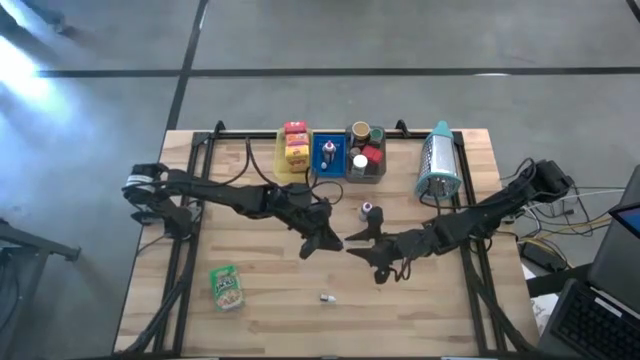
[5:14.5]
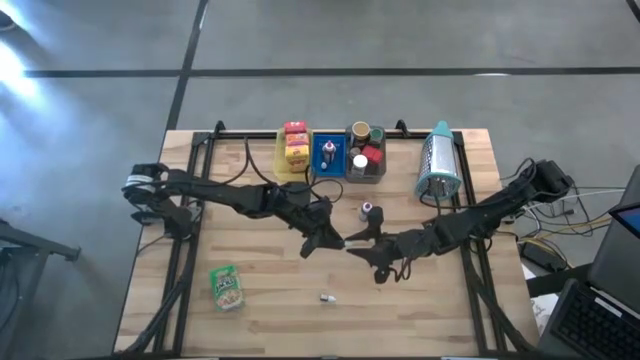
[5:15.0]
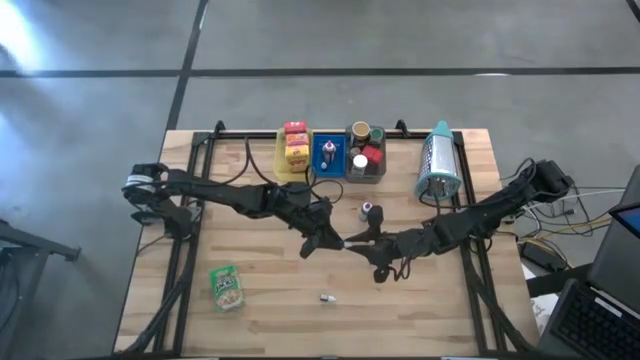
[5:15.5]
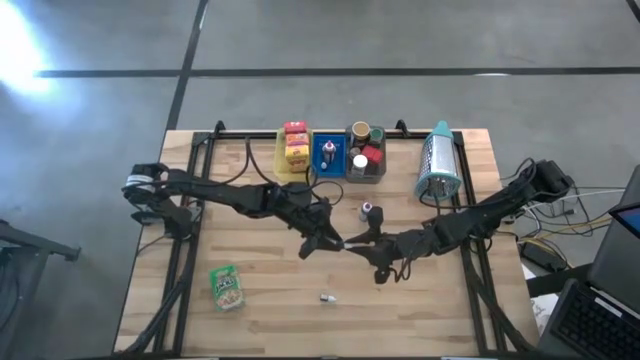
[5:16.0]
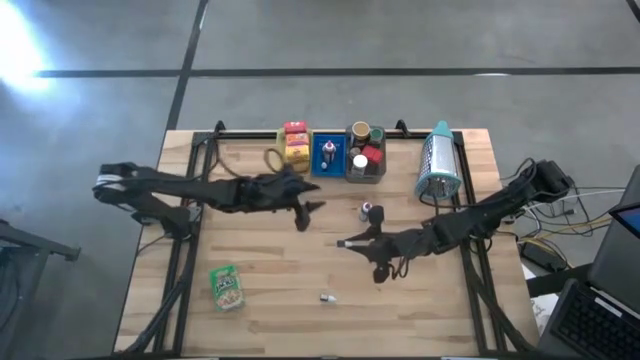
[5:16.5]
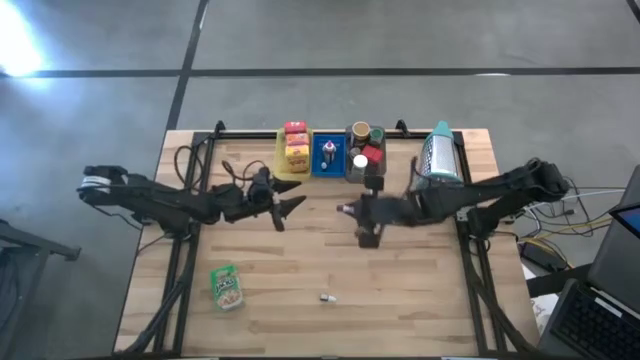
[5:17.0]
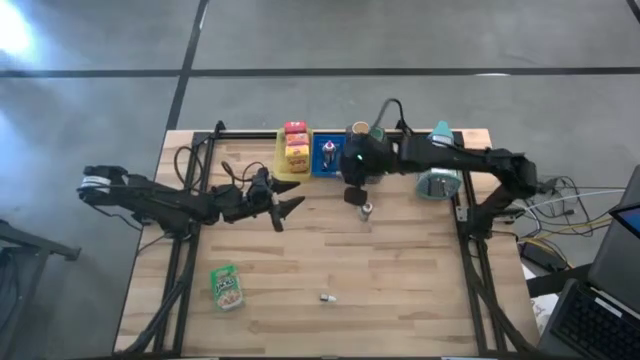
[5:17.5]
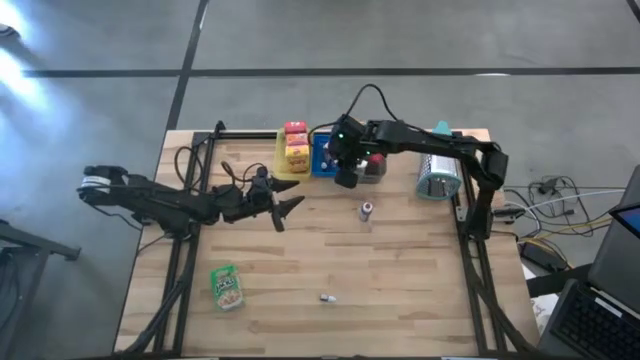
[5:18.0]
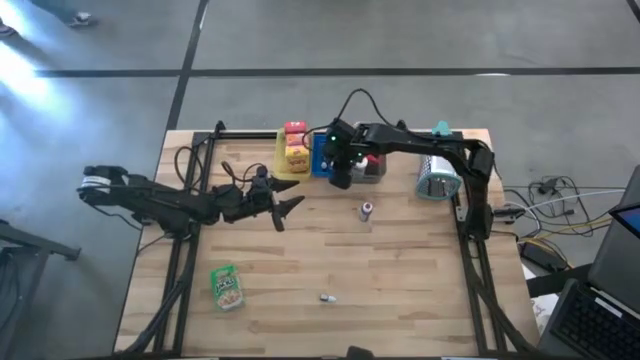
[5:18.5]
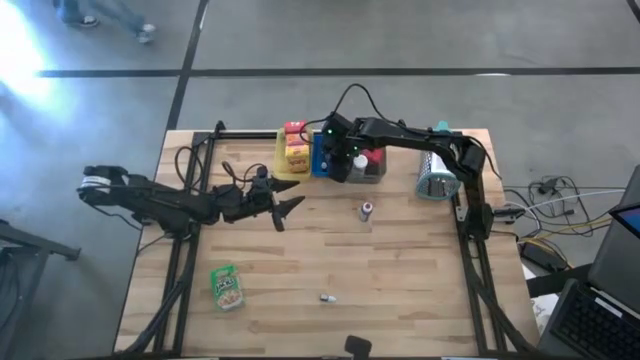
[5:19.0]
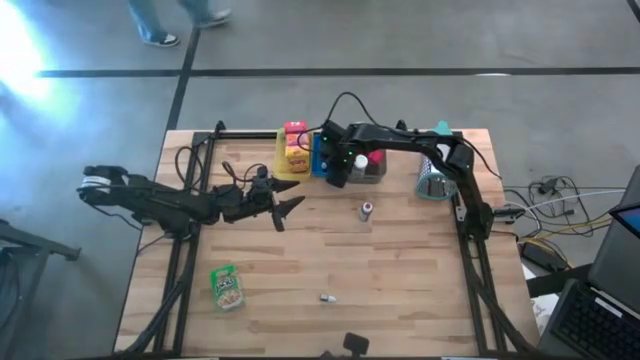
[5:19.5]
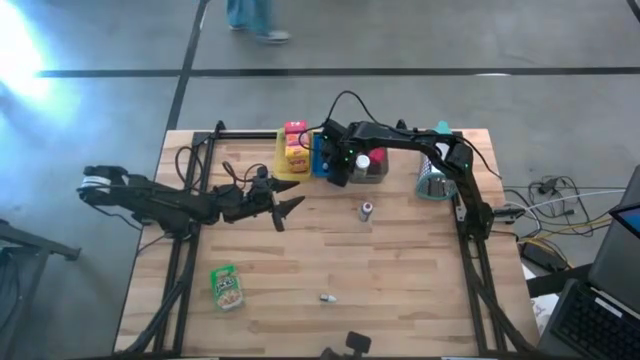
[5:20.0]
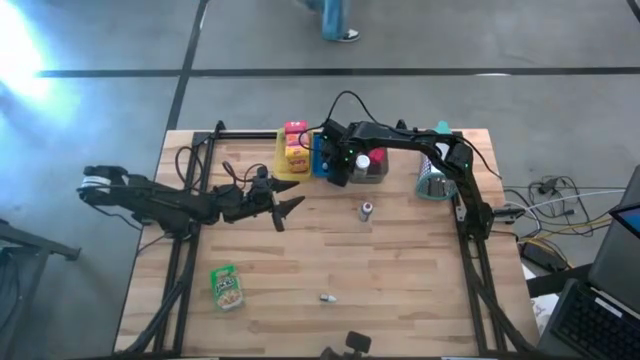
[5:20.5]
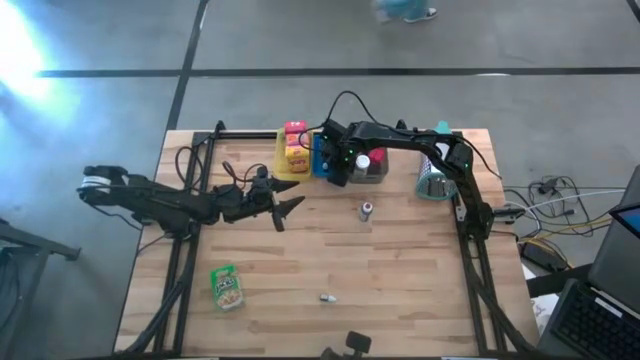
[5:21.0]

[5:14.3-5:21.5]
Task: Pick & Place Kitchen Items
Put the small purple food coloring bottle into the blue bin

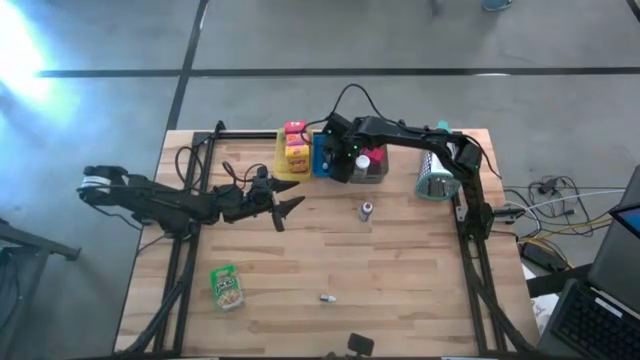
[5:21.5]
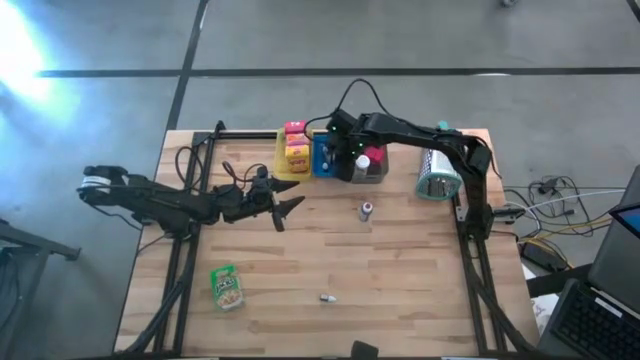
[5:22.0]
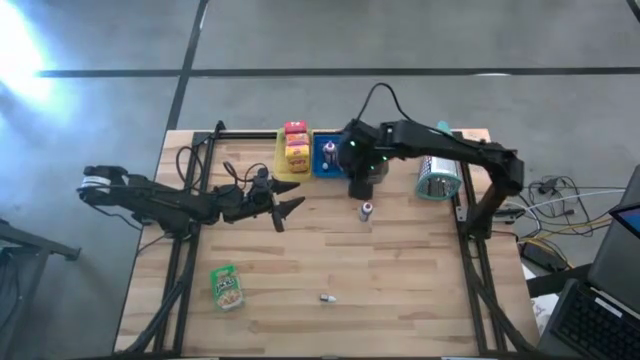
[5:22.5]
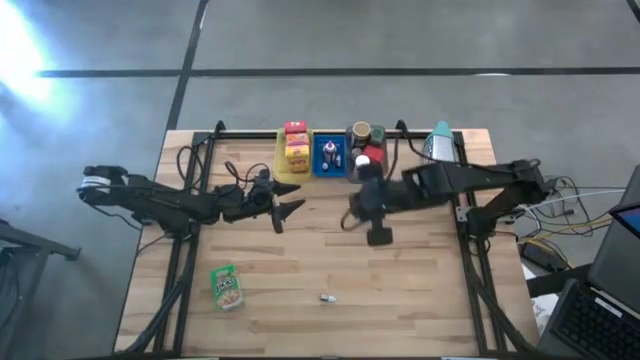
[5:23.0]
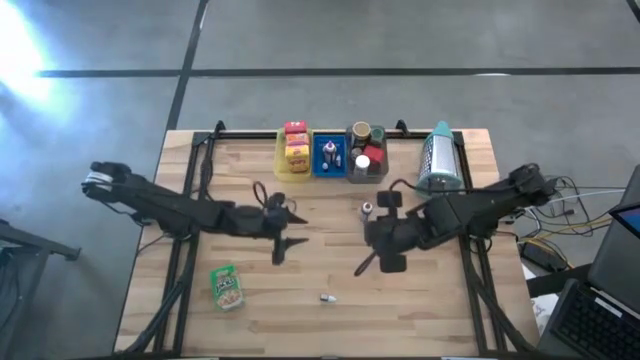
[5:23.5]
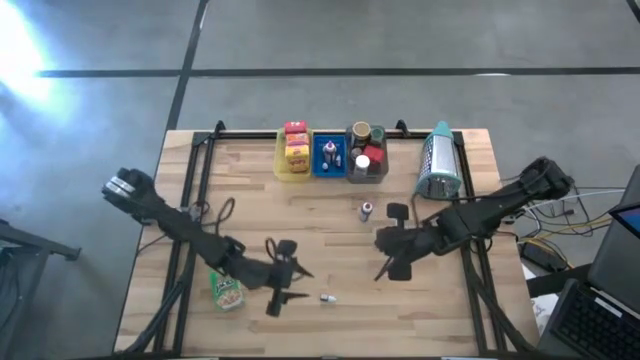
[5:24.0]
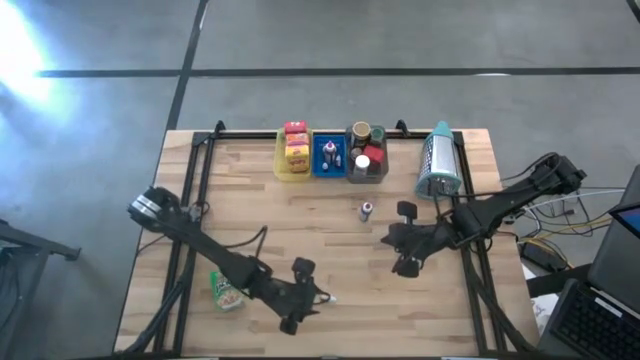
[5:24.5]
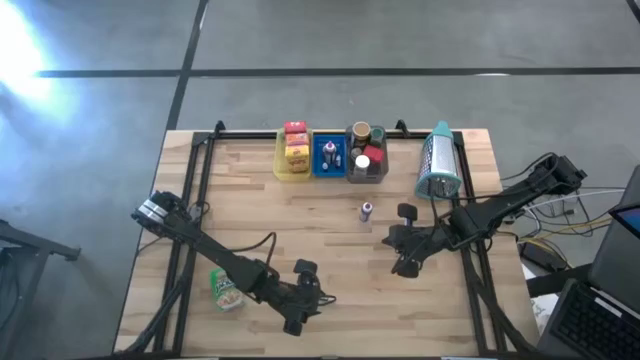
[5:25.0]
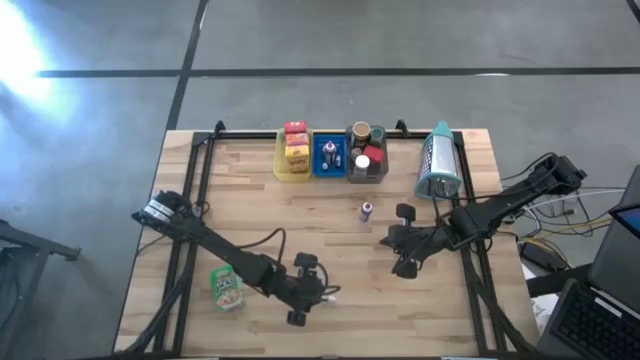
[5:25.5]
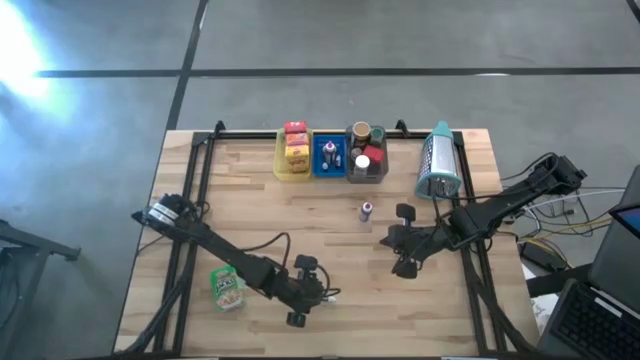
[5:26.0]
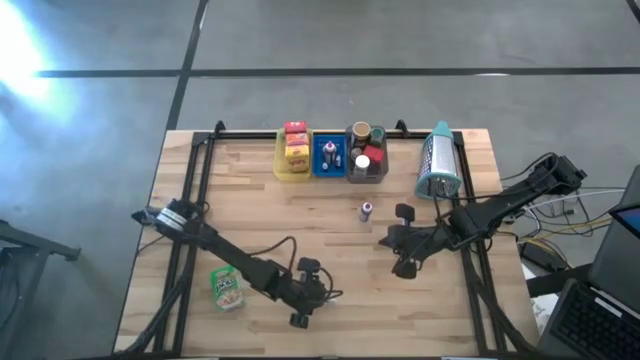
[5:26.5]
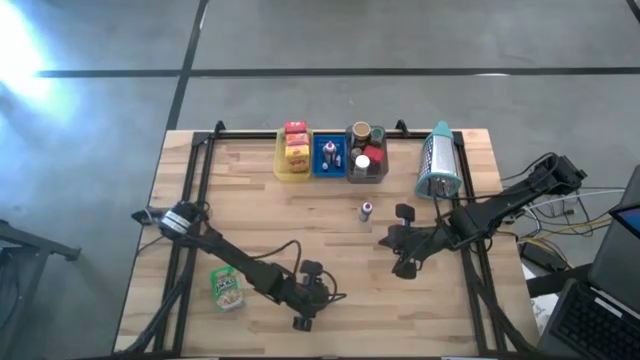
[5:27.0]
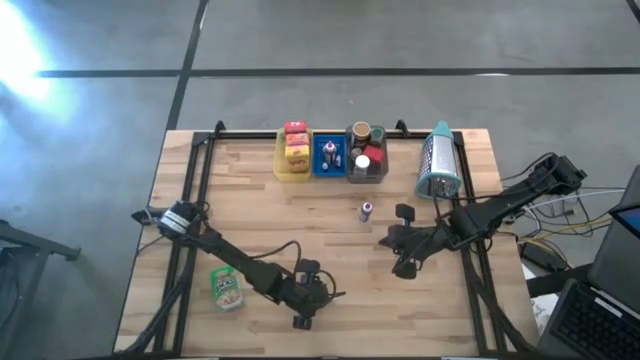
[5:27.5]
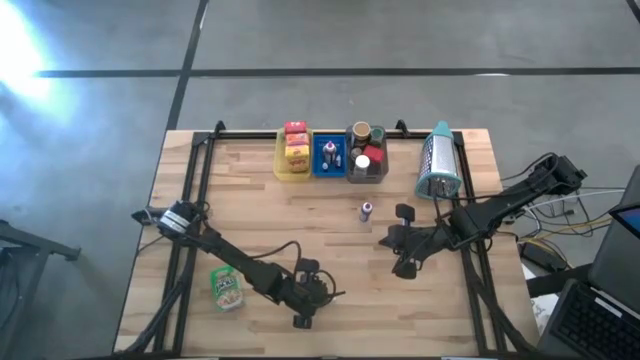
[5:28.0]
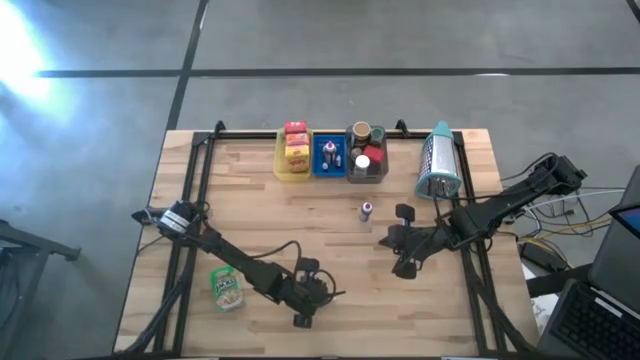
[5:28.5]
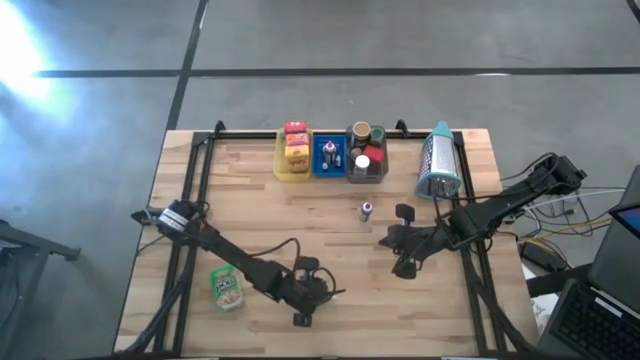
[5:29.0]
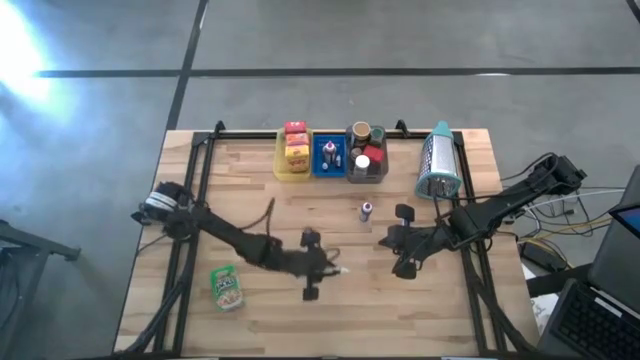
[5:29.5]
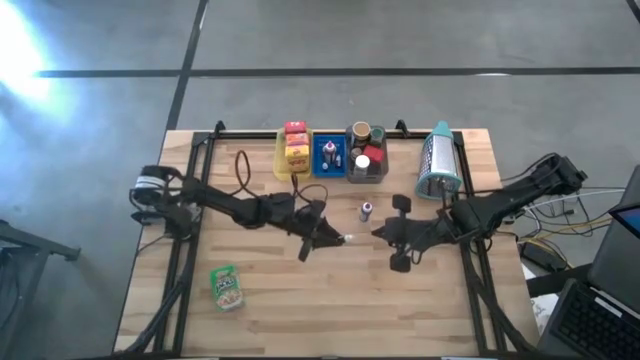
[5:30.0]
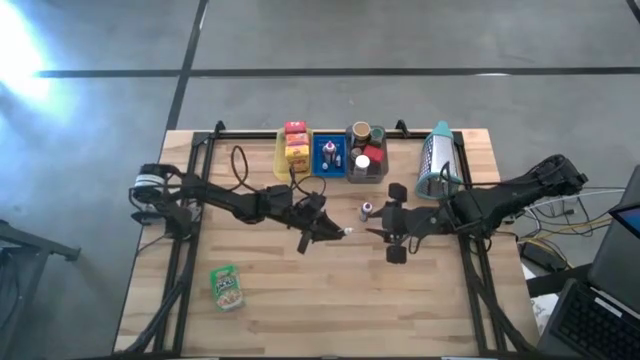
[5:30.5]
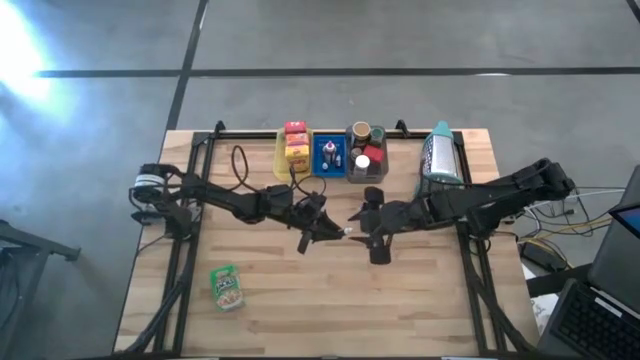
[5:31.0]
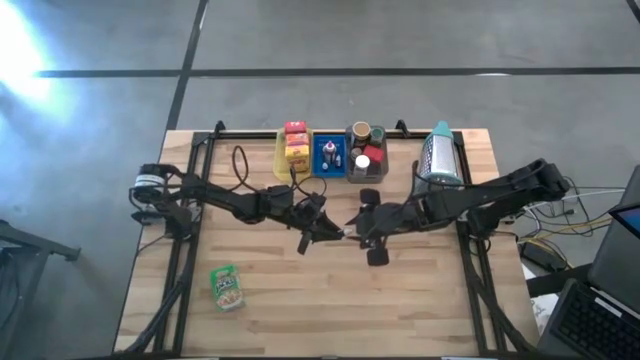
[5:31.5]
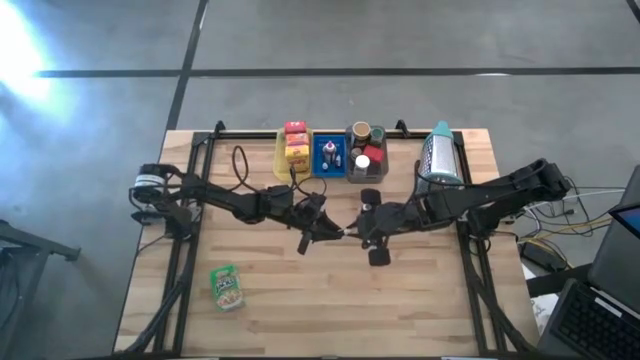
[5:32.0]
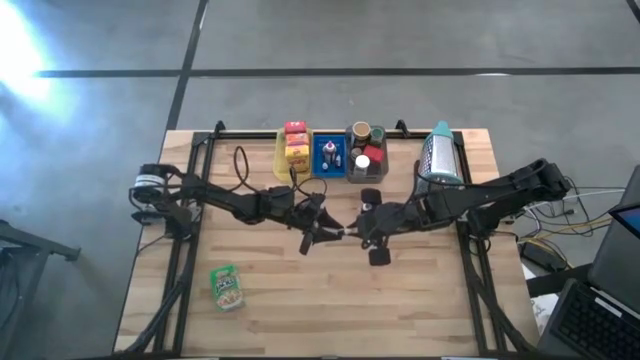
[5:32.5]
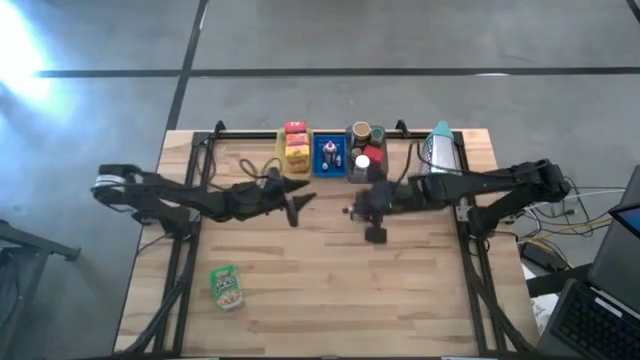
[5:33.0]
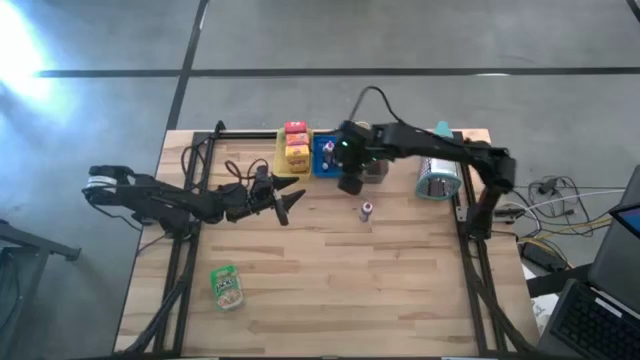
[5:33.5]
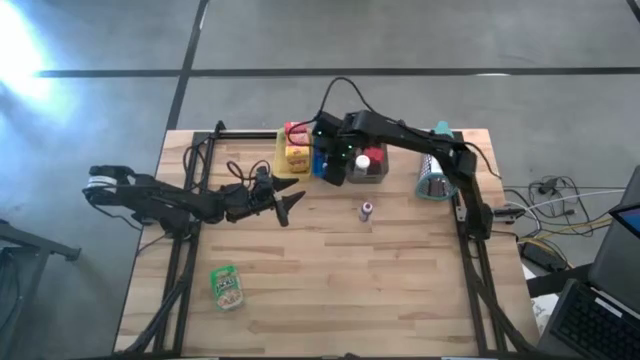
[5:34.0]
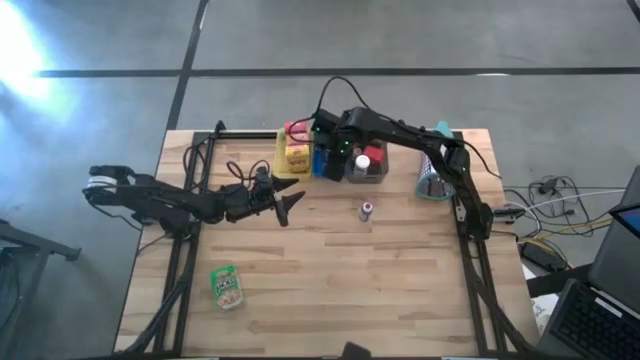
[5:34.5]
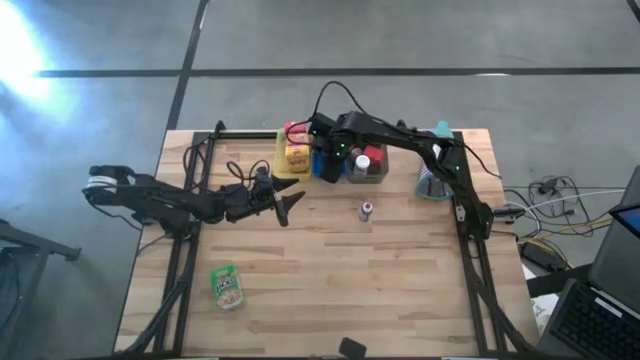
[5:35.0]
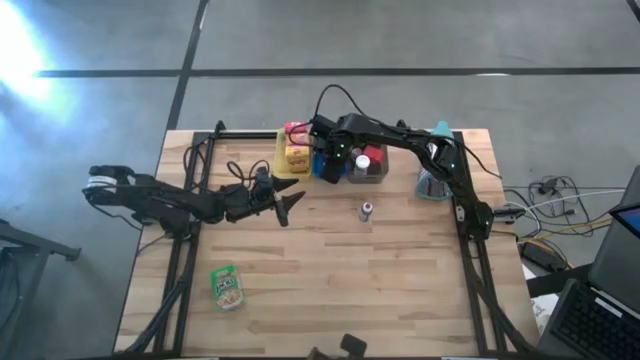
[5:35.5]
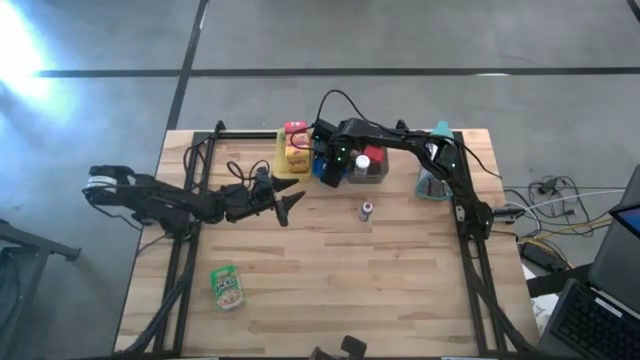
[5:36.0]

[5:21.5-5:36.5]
Put the small red food coloring bottle into the blue bin
